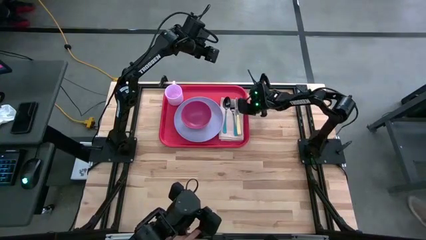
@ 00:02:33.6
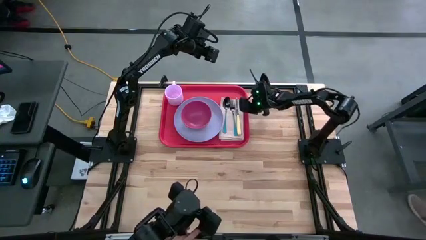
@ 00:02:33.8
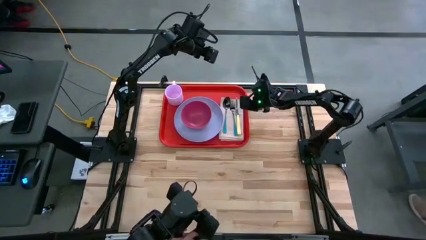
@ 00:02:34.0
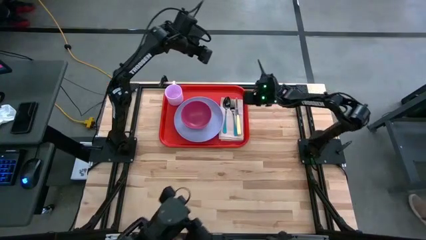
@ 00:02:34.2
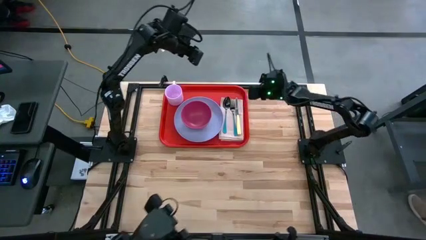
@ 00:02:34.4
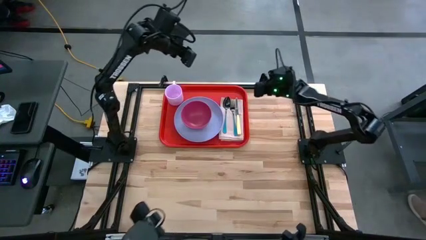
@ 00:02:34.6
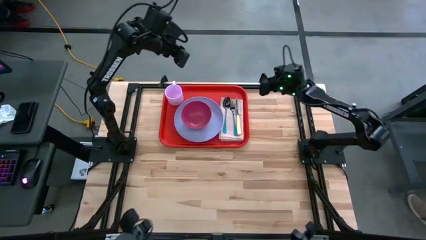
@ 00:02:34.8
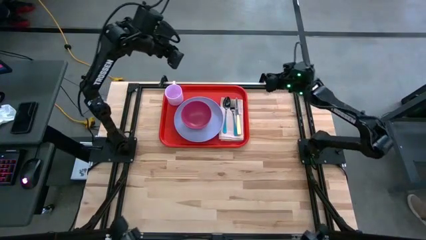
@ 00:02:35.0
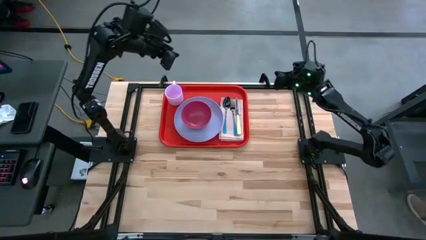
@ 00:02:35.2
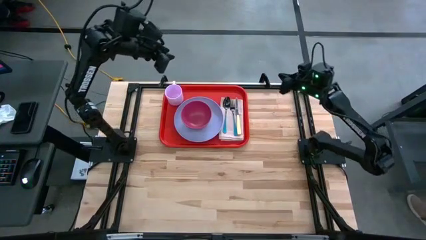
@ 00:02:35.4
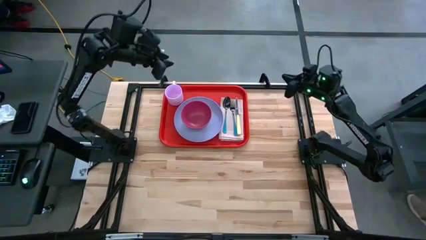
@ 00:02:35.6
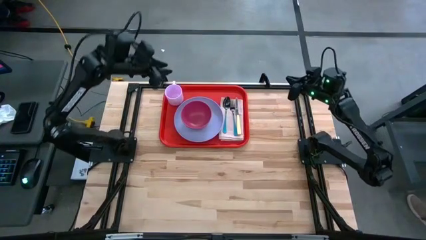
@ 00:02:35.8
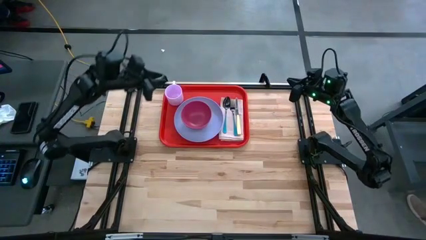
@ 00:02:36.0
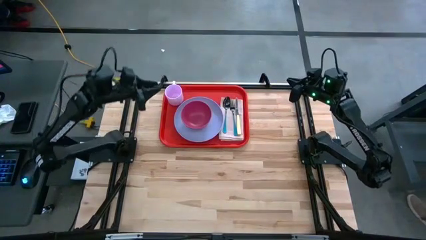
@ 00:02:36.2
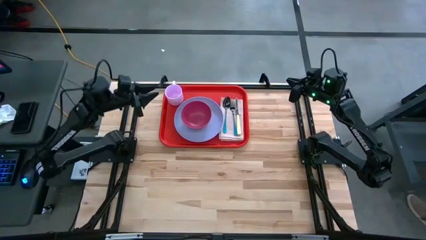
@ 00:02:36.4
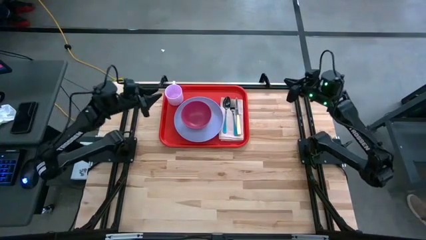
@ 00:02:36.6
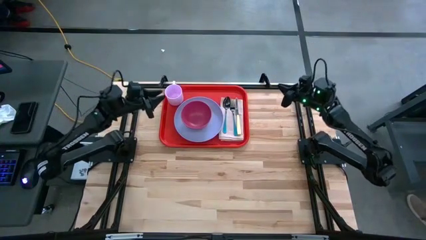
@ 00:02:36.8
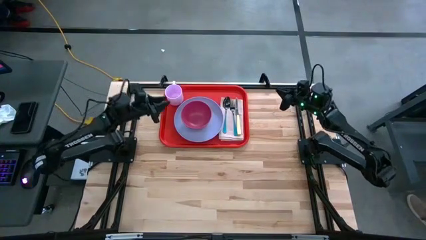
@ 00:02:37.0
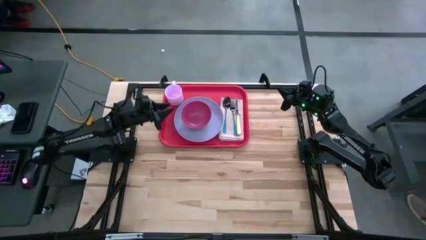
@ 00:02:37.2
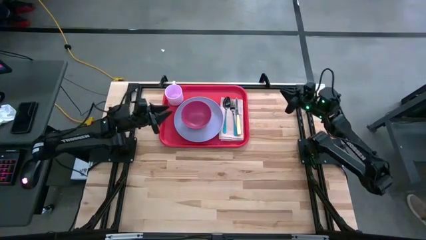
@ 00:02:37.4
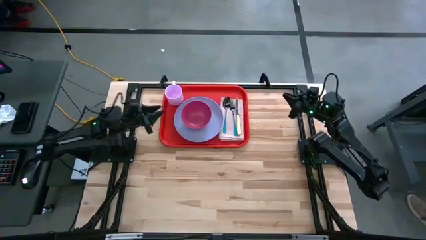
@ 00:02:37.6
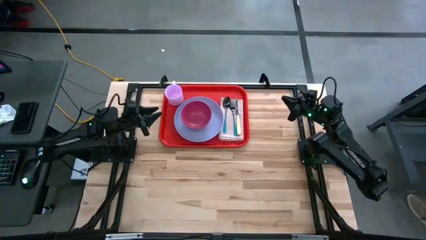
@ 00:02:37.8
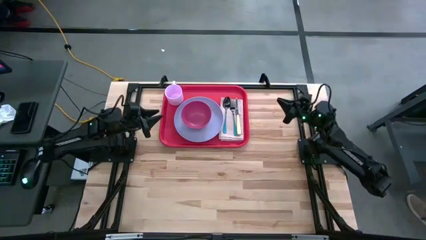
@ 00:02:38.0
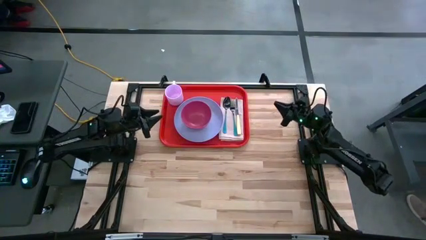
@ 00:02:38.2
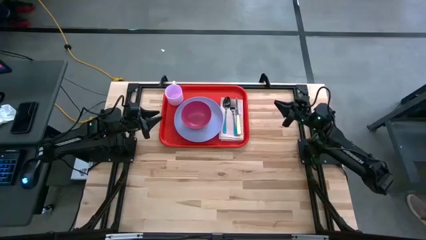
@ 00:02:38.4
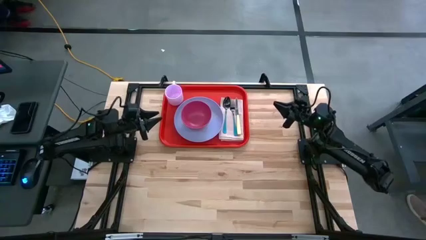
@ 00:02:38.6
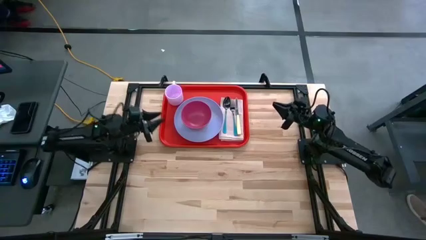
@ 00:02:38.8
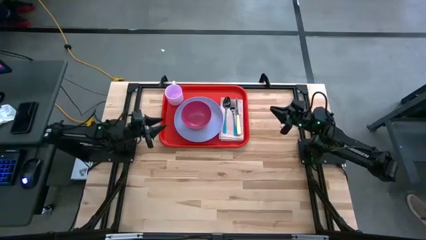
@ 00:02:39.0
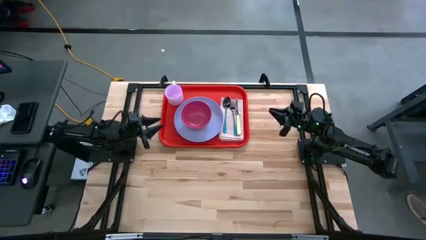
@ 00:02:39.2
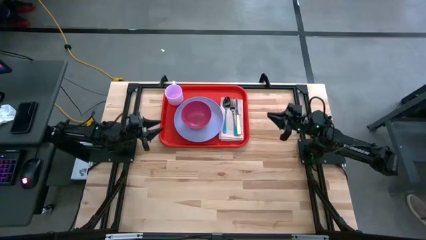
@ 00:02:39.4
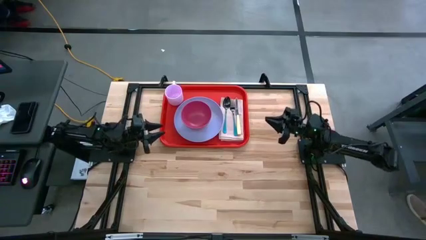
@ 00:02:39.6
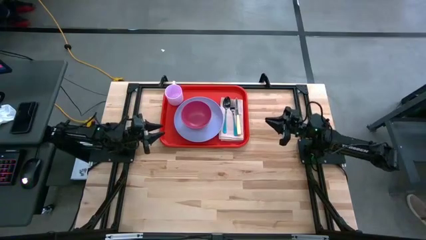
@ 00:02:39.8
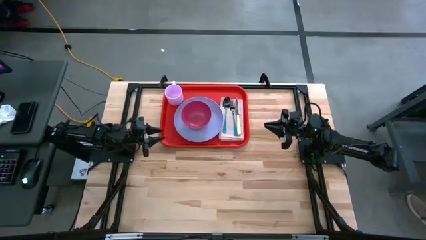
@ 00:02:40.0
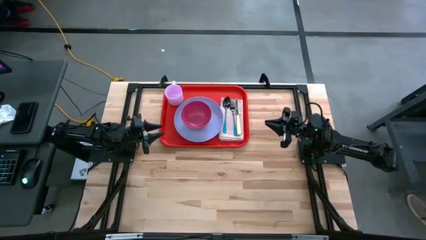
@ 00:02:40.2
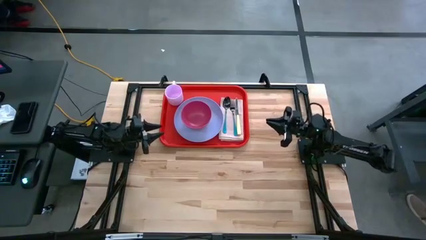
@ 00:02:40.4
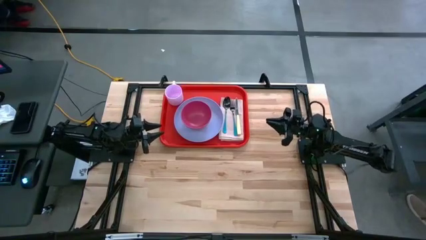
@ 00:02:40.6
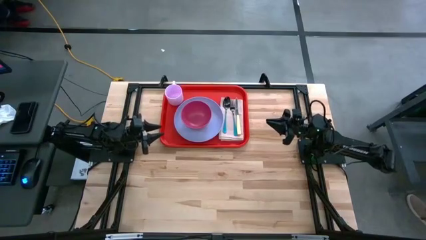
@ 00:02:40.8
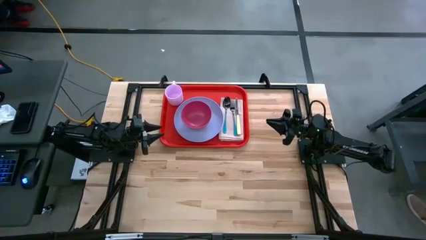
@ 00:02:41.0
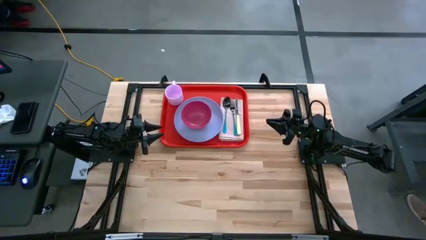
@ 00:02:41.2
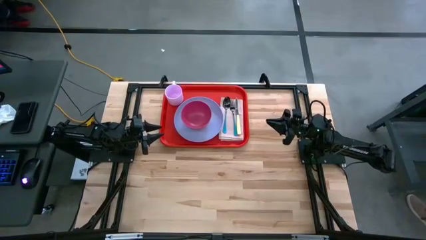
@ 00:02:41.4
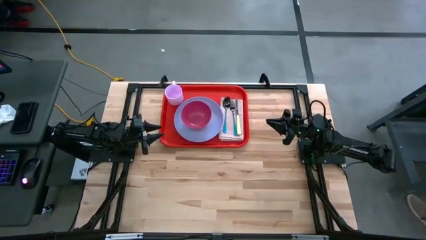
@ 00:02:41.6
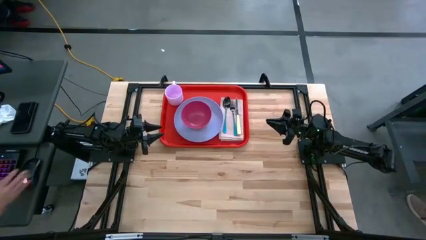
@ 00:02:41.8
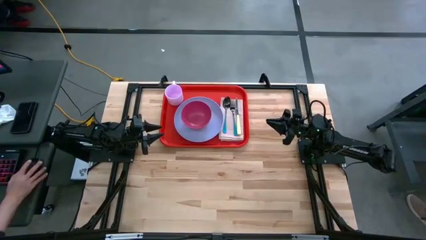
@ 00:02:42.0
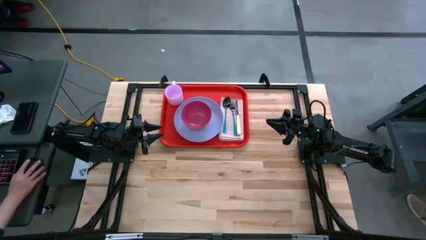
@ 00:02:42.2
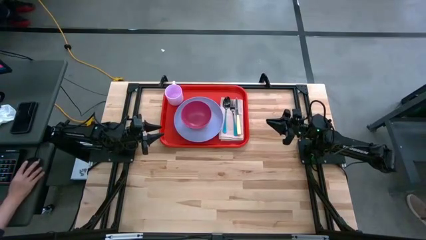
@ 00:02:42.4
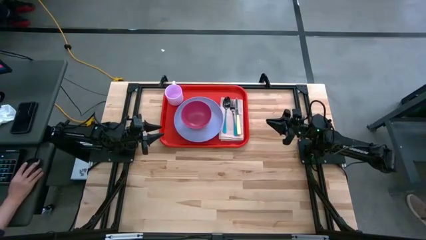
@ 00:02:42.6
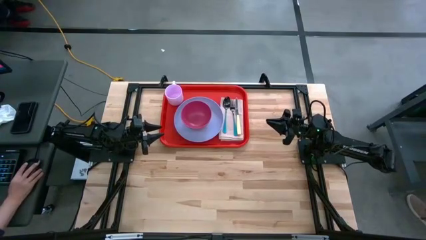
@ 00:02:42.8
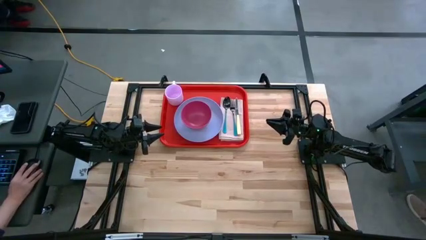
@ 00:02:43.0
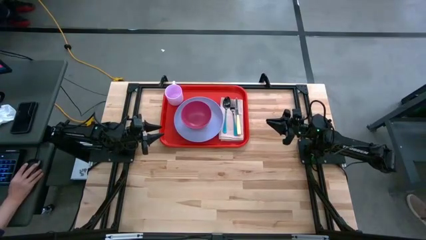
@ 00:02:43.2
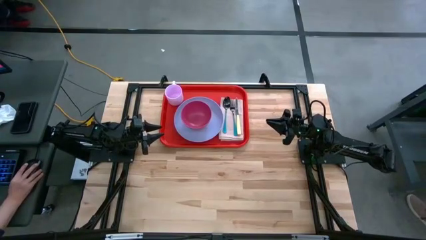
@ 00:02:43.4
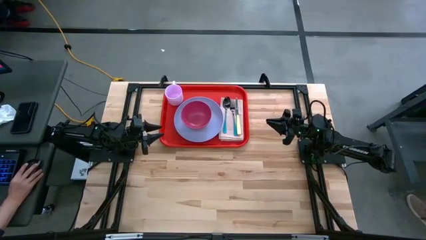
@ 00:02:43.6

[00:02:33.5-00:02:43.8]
Task: Set up tray
Return to Home Position
